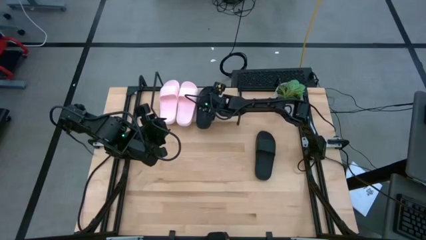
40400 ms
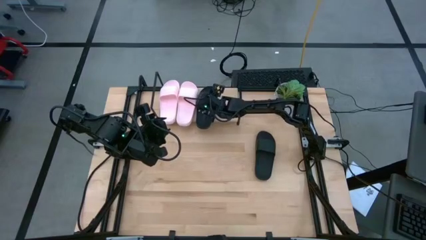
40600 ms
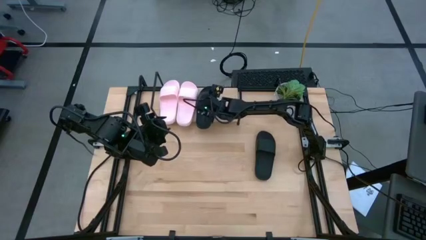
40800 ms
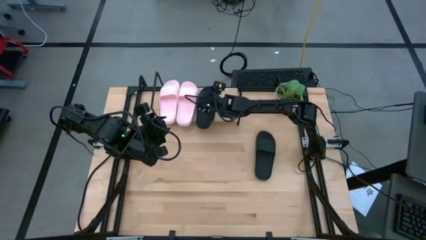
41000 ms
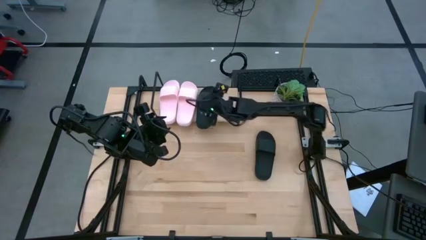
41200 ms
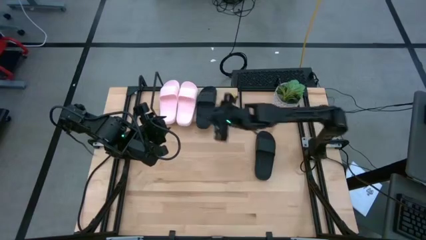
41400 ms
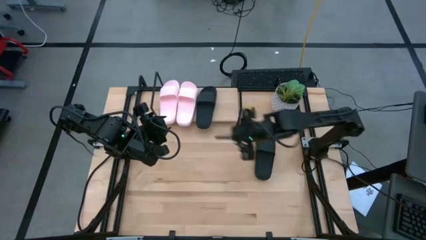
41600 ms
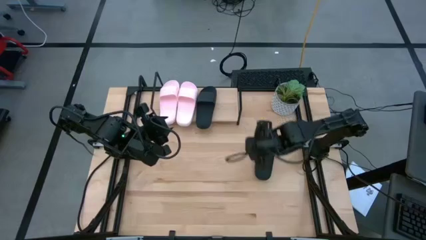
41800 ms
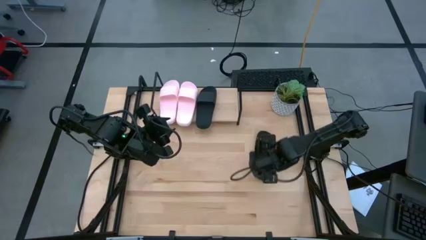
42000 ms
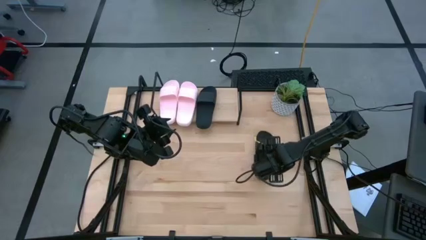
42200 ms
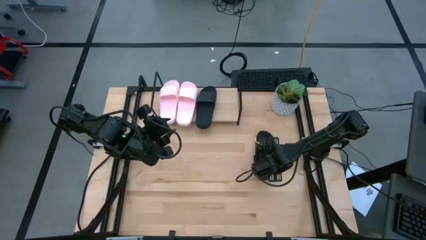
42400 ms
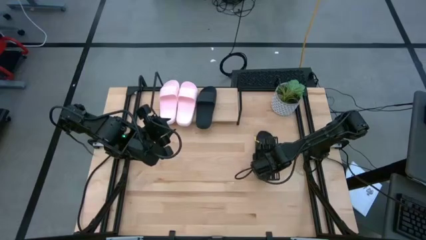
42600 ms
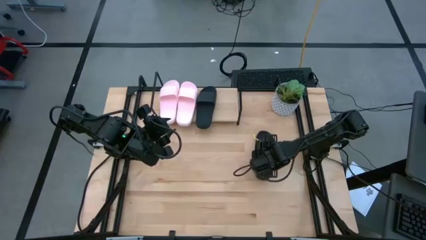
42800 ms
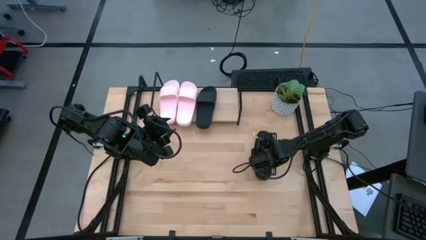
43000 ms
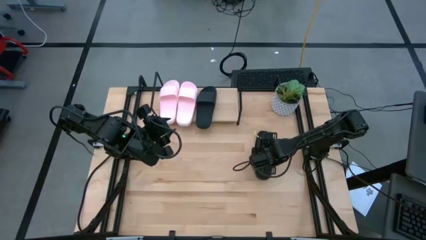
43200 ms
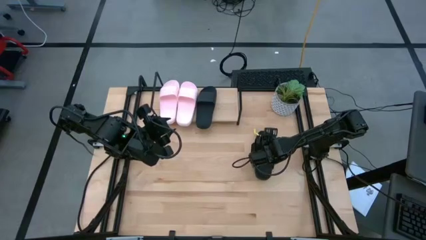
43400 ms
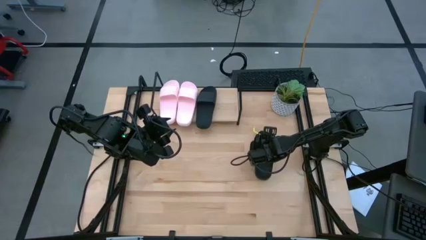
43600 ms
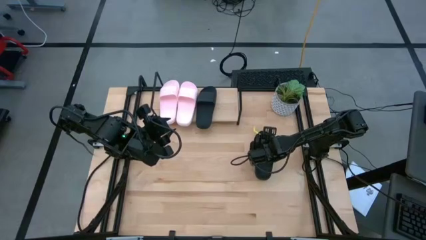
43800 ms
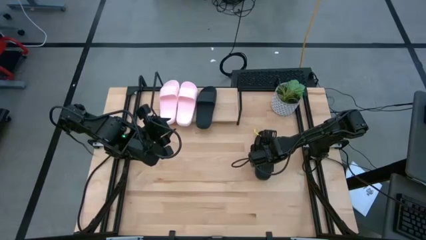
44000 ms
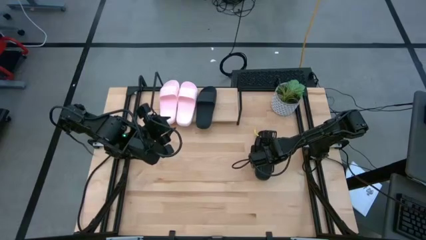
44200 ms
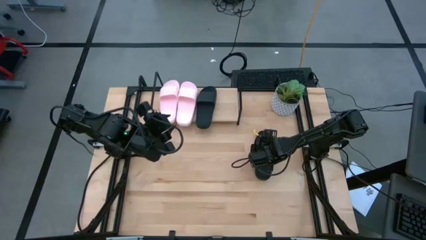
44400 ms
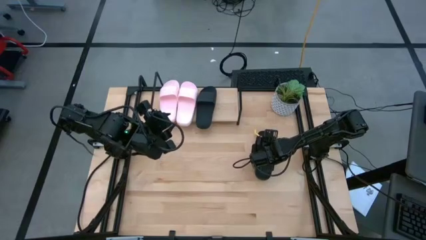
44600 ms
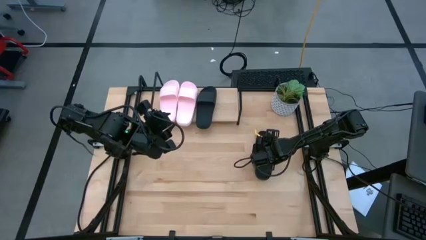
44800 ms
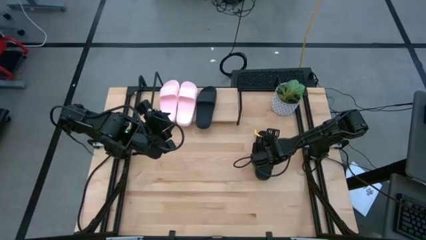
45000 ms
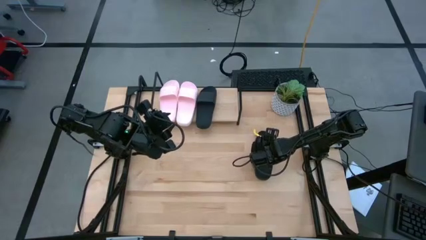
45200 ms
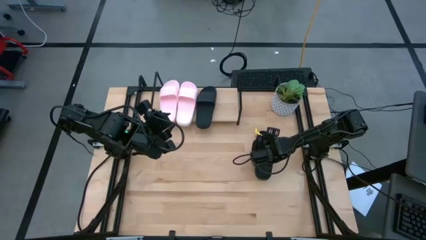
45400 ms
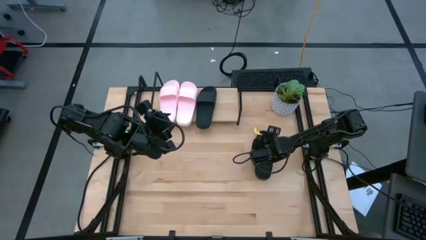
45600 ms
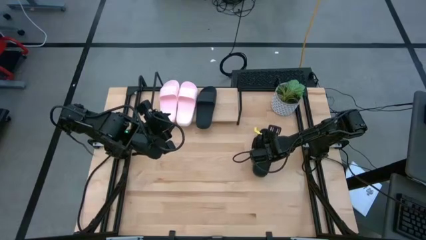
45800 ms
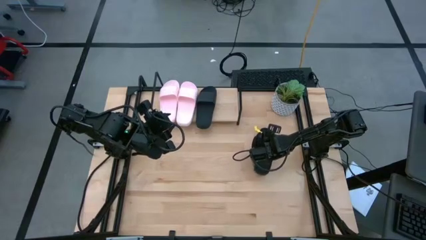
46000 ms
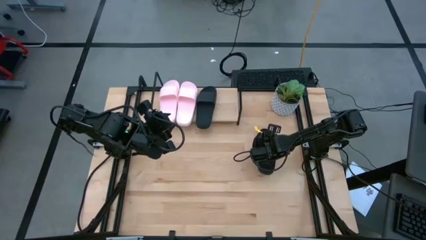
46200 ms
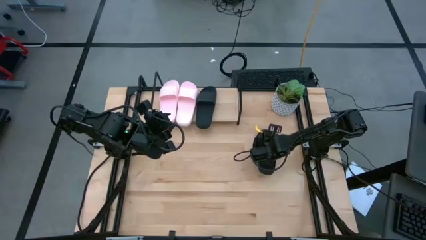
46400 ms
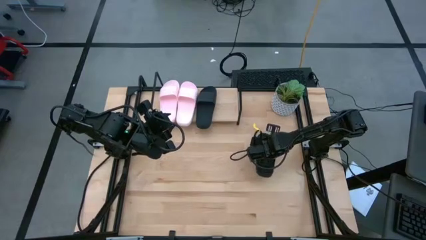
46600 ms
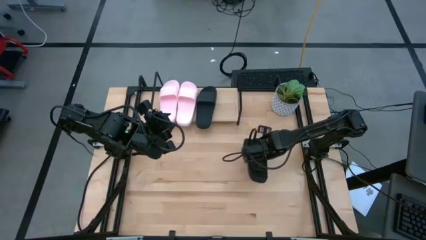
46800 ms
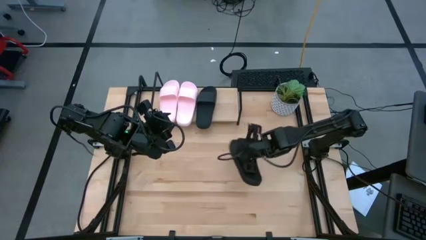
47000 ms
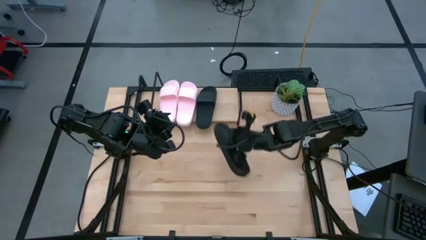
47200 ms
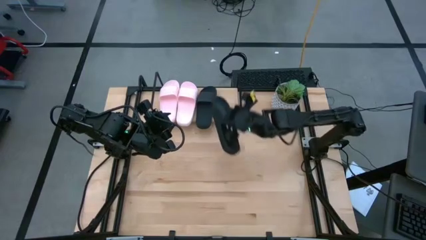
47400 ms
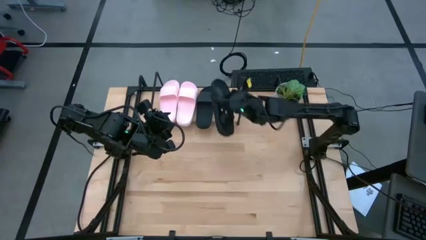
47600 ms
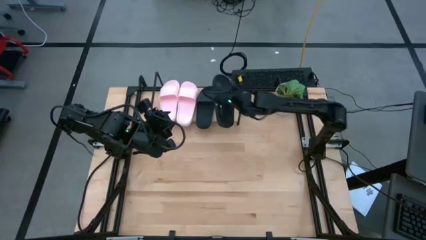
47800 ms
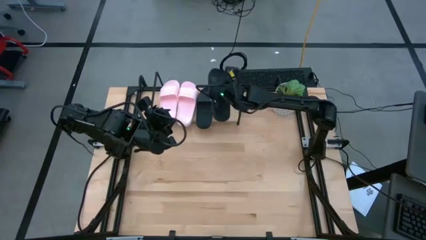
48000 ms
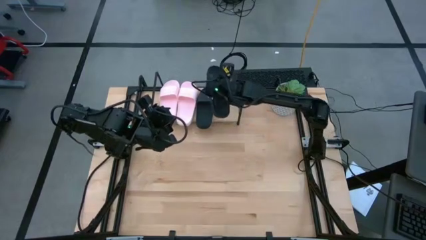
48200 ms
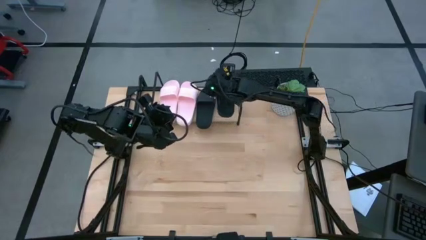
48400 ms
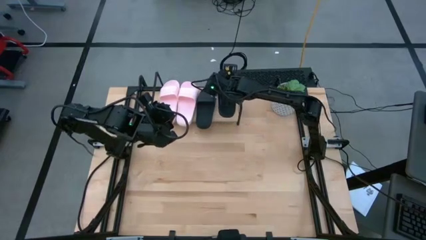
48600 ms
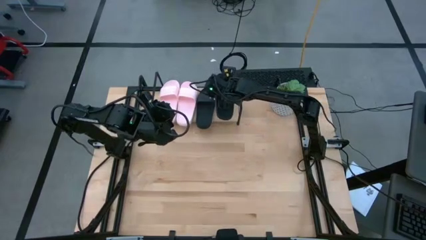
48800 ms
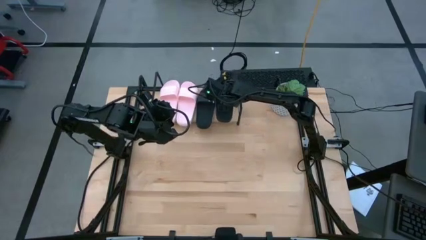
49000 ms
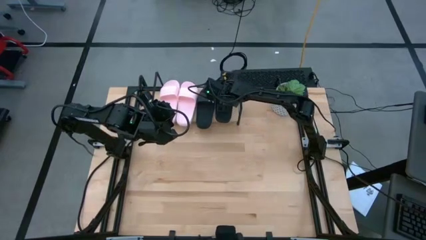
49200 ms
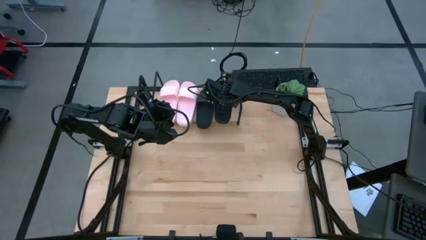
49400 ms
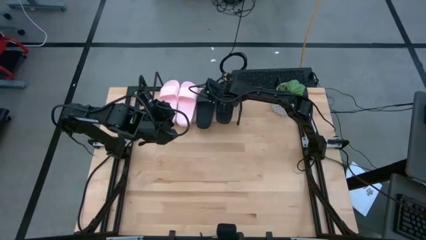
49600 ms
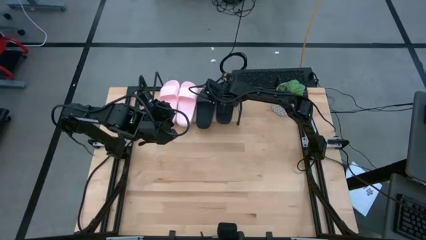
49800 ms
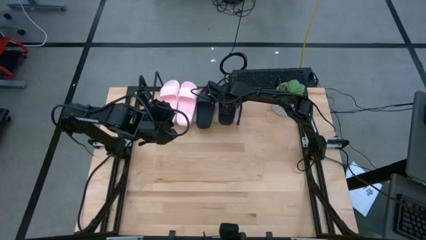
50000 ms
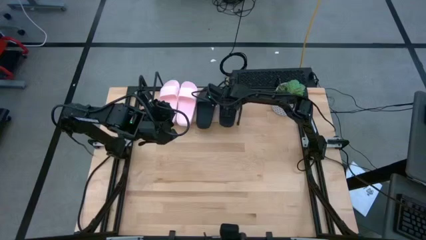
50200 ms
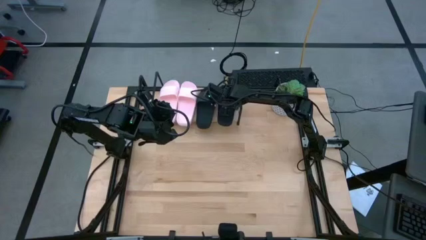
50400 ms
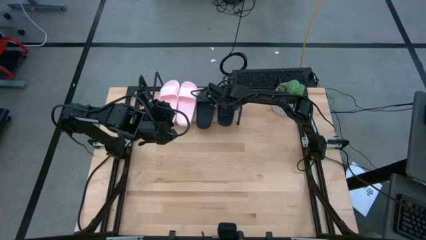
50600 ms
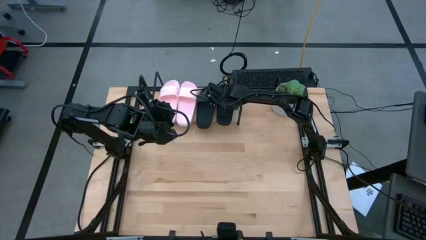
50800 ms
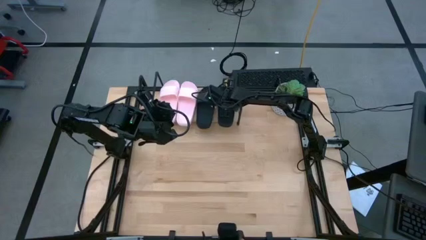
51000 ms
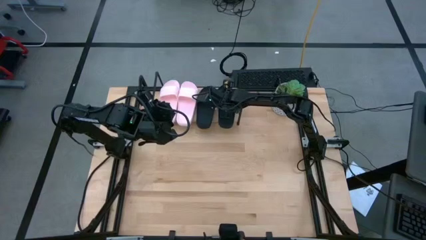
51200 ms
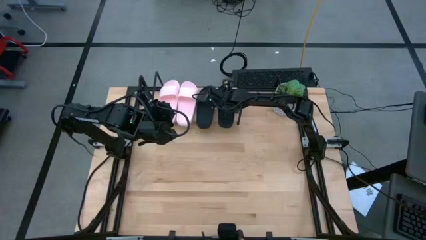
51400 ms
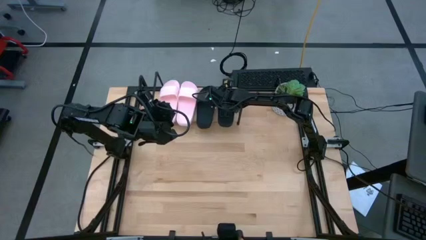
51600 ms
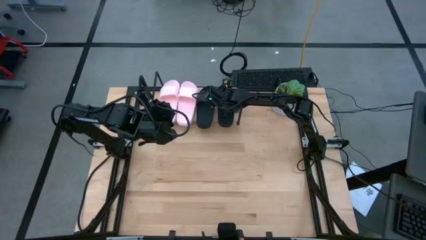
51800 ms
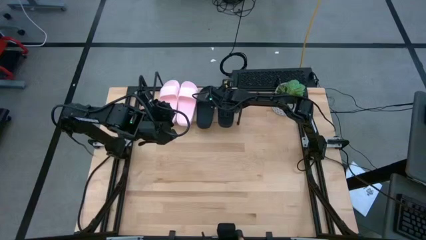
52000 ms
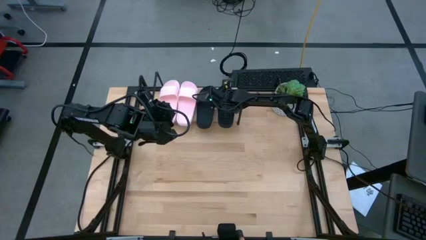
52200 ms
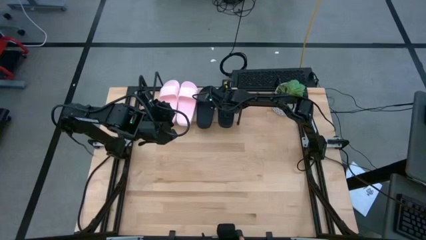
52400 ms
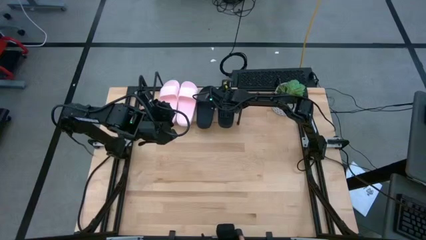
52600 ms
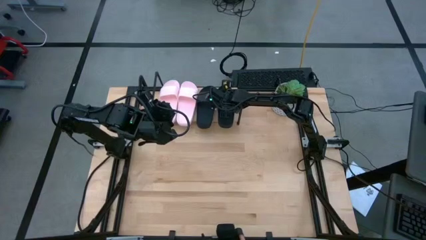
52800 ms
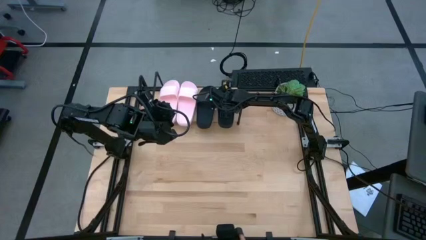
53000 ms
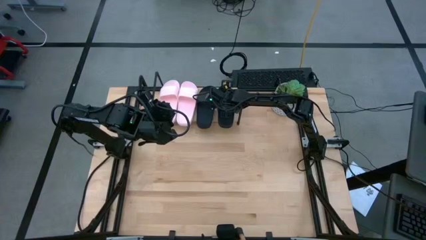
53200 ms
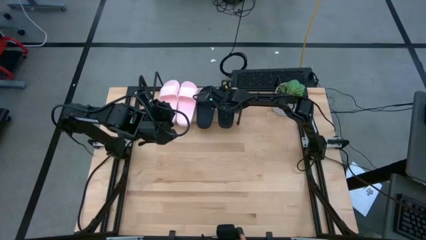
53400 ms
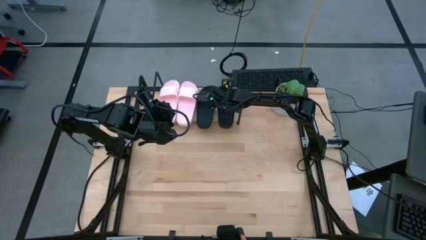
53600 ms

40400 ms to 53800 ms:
Task: Pick and place slides into the shelf
Put the black slipper on the shelf
